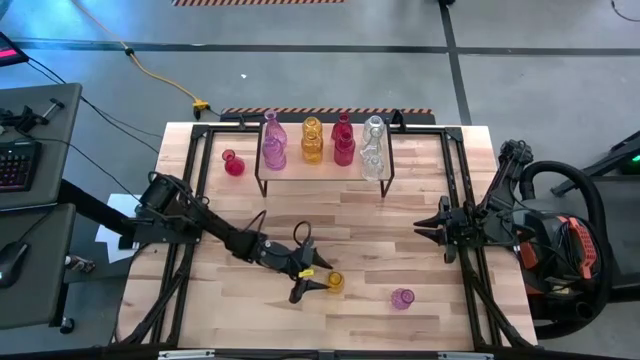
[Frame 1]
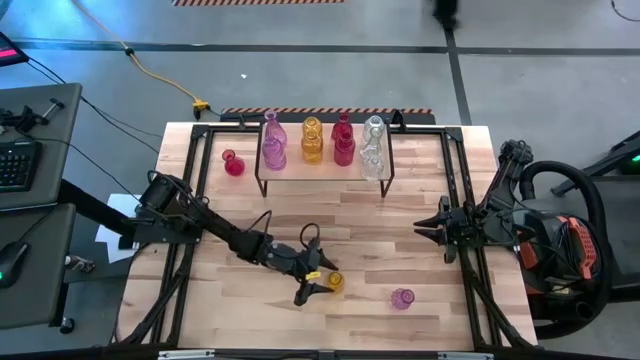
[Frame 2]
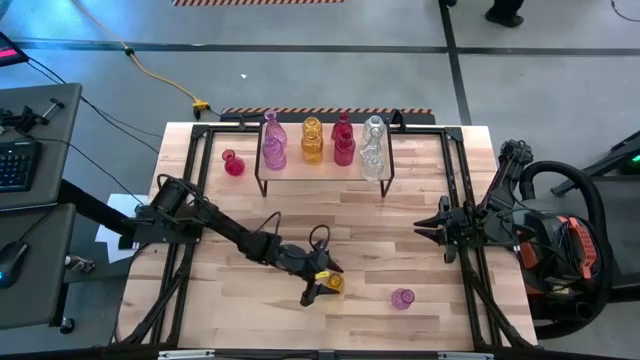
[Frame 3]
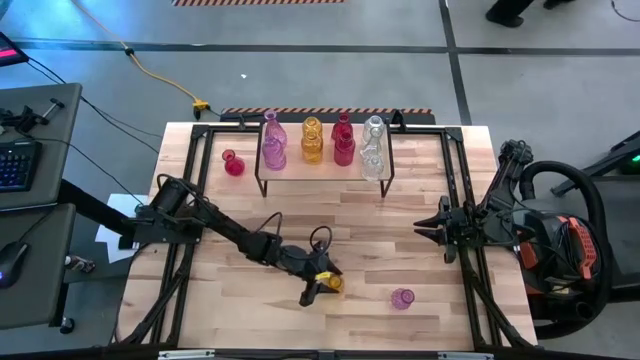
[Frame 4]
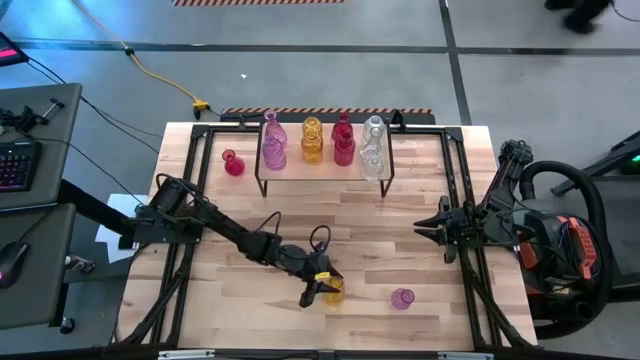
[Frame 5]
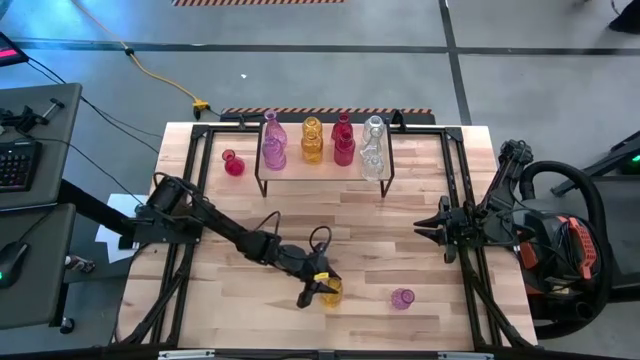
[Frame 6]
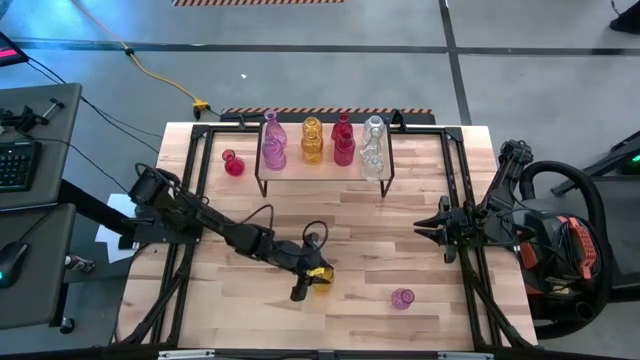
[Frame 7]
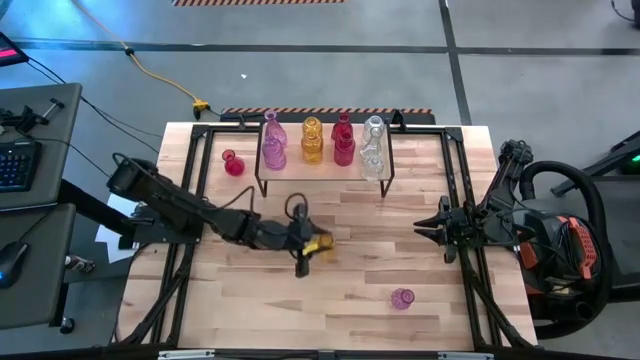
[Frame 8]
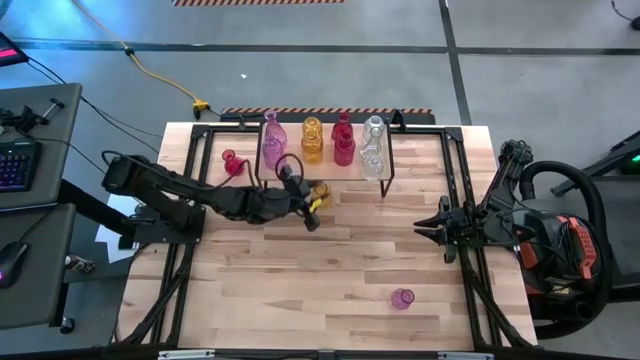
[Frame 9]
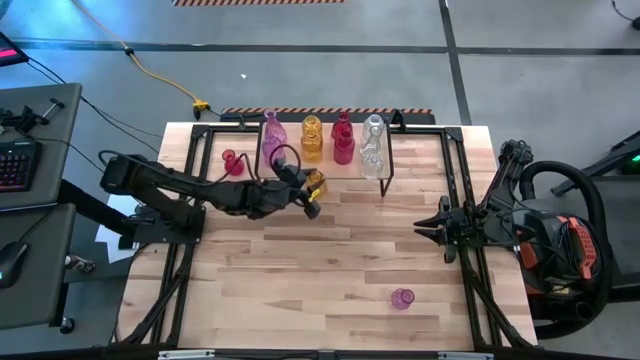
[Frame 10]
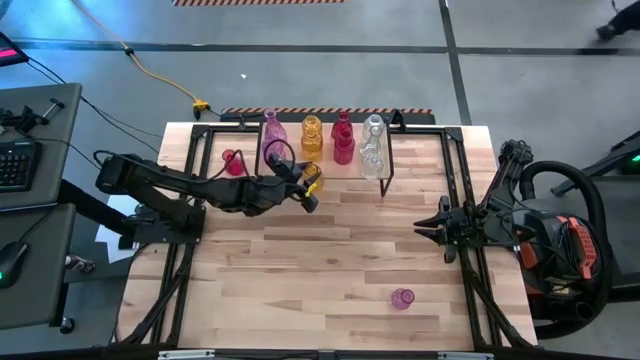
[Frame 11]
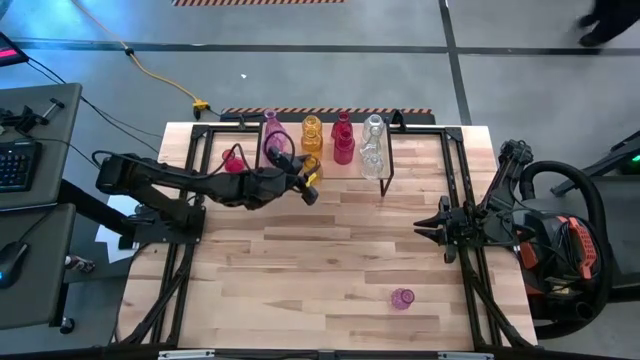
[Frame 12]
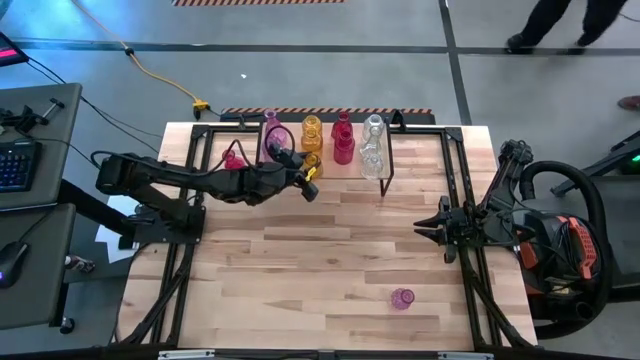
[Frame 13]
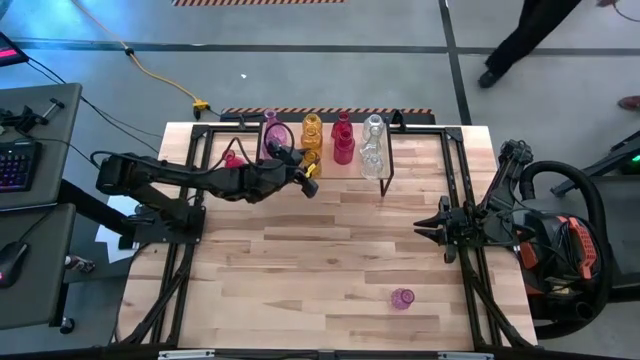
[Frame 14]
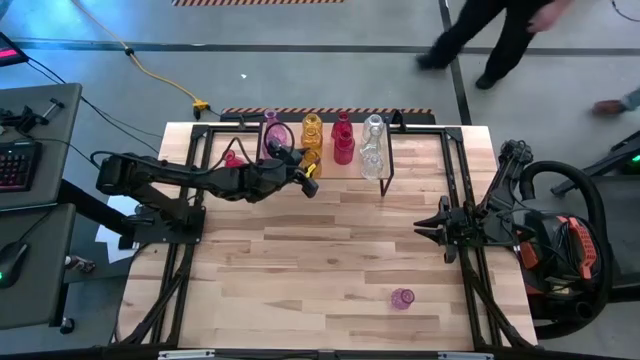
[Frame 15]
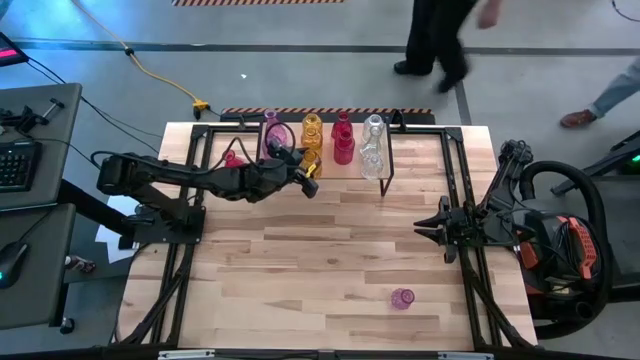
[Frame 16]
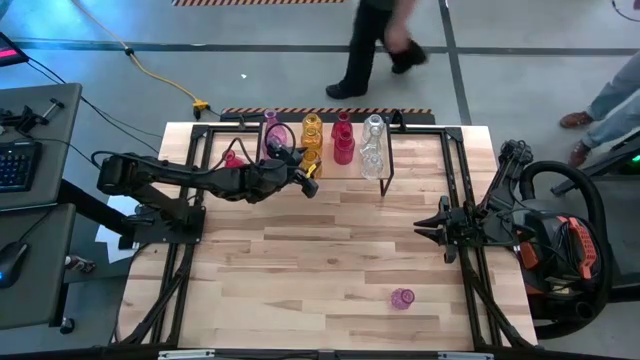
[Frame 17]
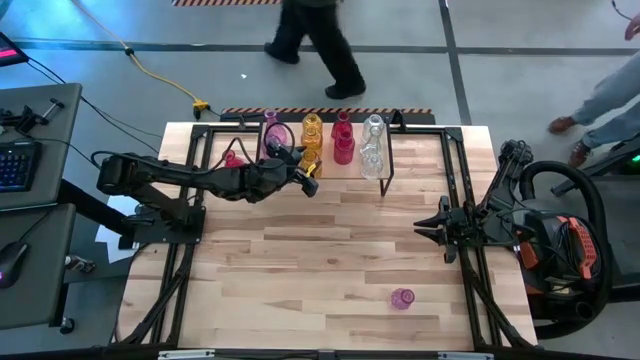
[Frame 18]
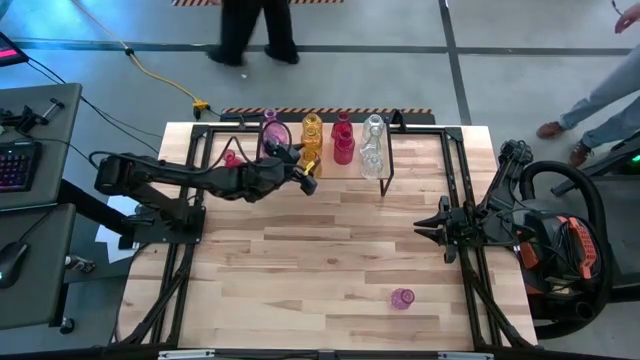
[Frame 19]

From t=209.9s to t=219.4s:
Task: sort vases onto shelf
Put the yellow vase on the shelf aligned with the other yellow vases

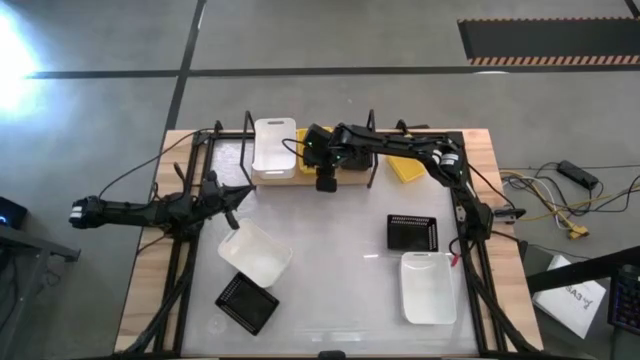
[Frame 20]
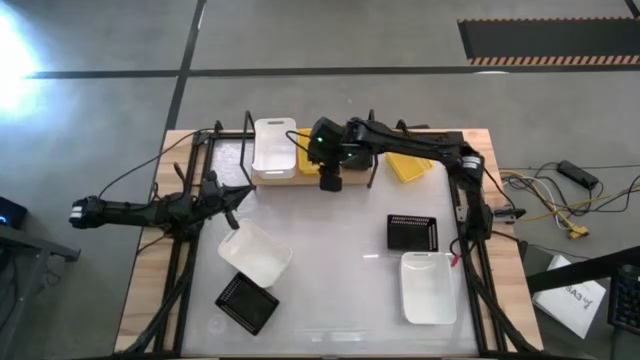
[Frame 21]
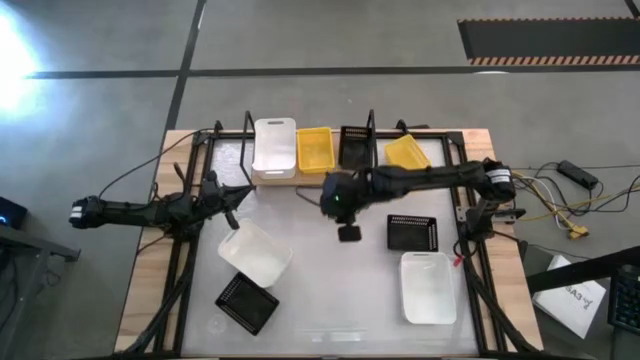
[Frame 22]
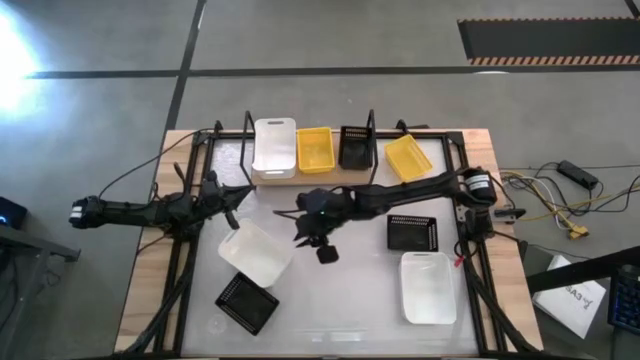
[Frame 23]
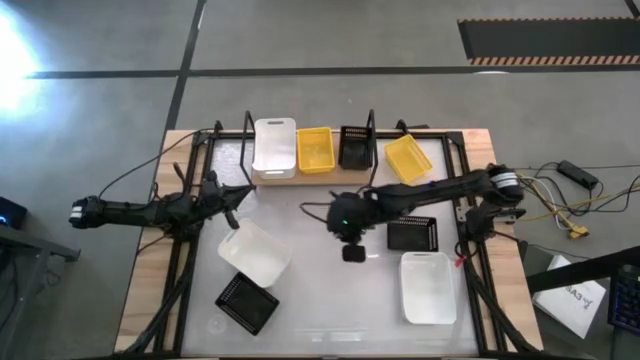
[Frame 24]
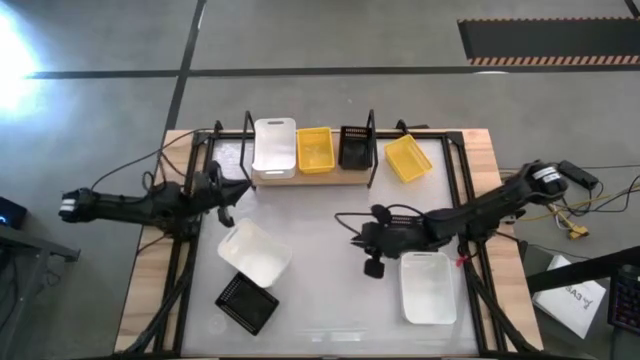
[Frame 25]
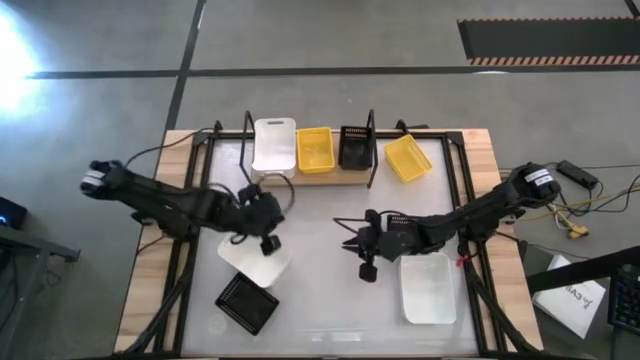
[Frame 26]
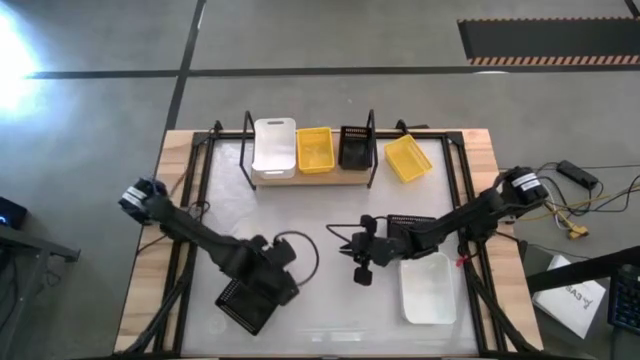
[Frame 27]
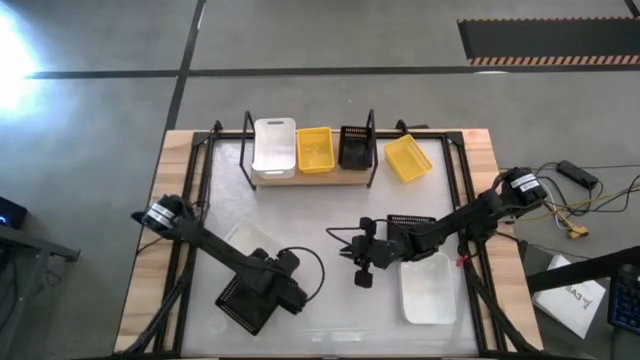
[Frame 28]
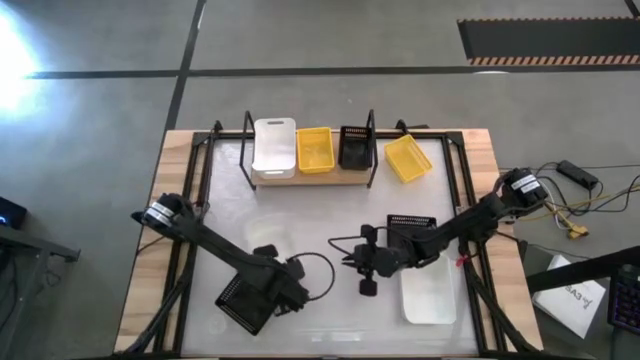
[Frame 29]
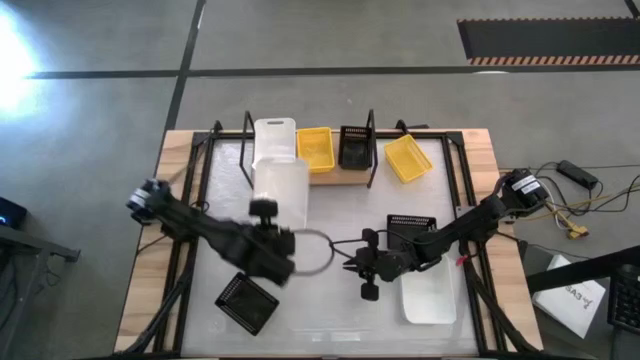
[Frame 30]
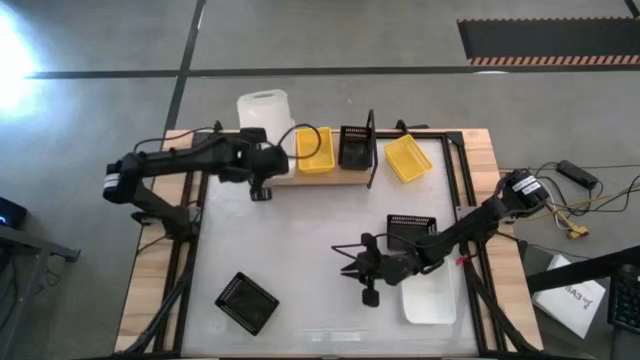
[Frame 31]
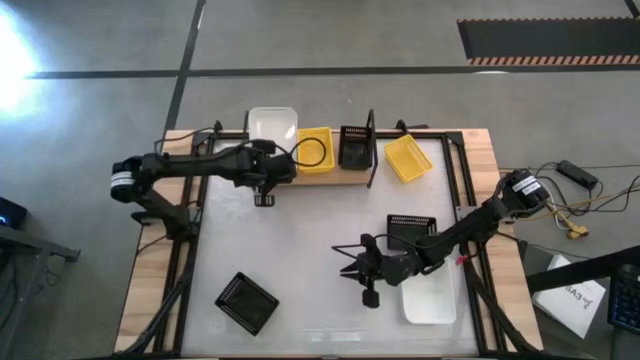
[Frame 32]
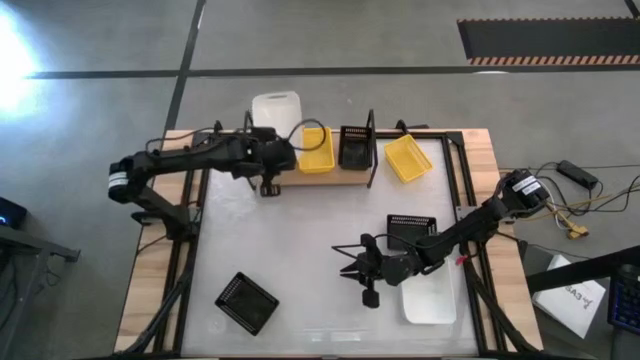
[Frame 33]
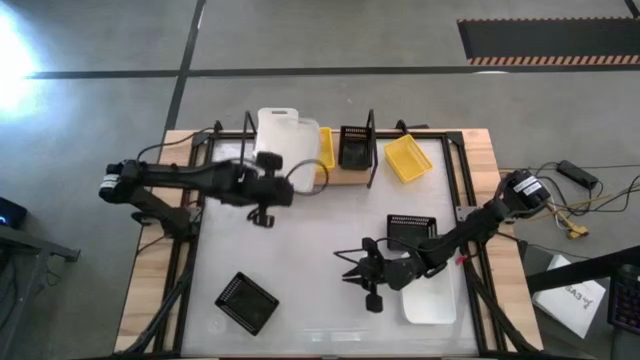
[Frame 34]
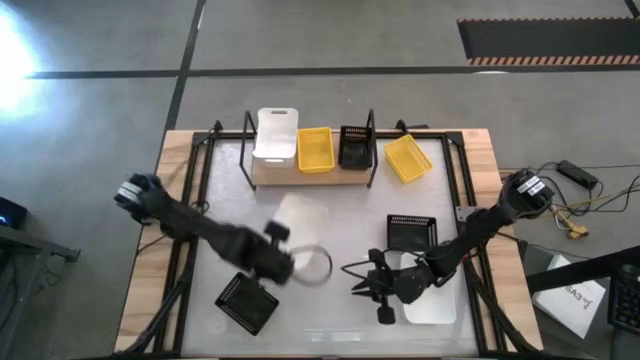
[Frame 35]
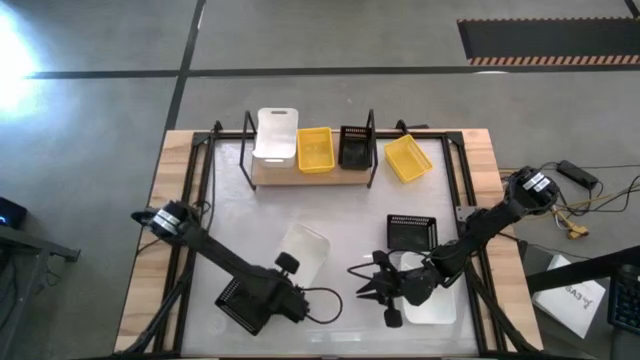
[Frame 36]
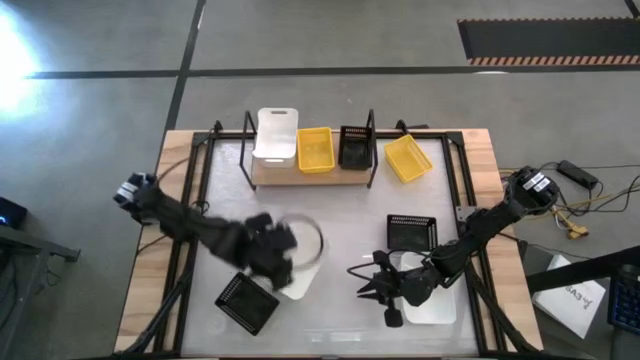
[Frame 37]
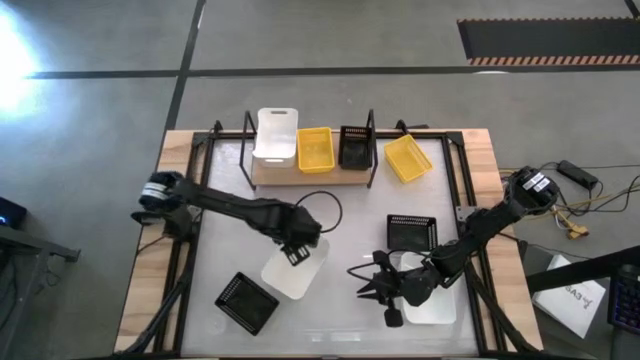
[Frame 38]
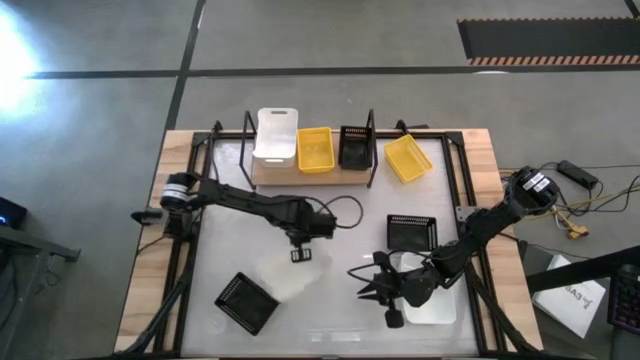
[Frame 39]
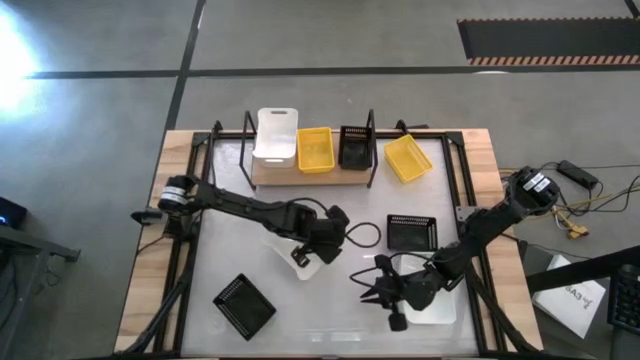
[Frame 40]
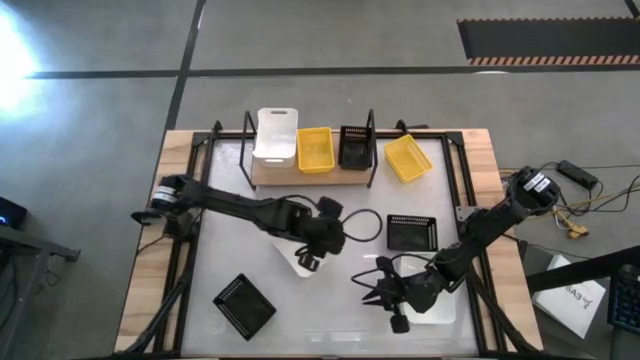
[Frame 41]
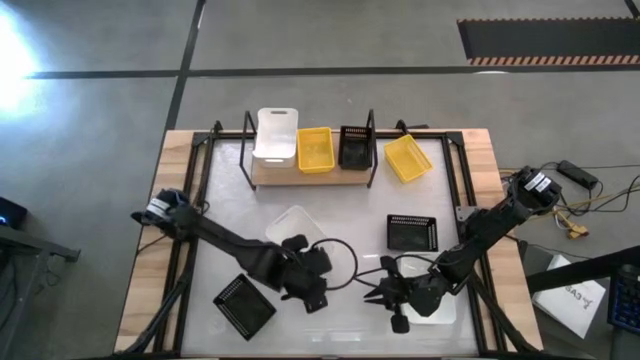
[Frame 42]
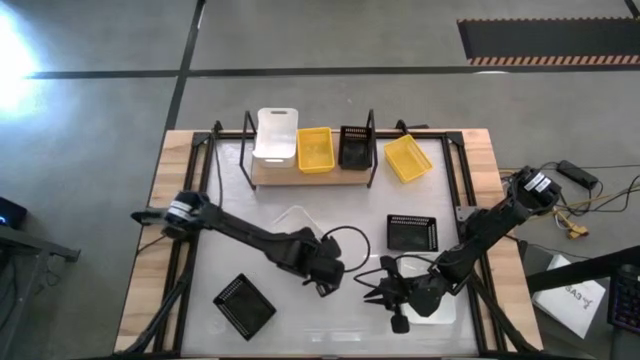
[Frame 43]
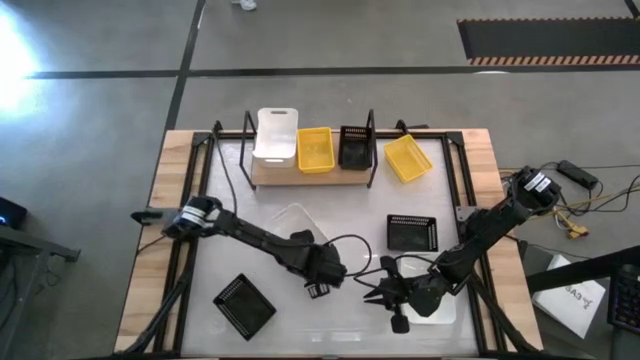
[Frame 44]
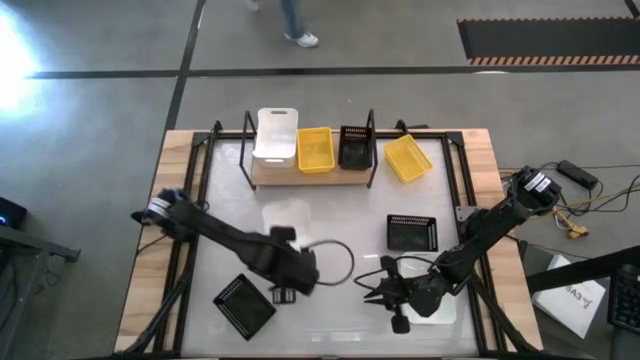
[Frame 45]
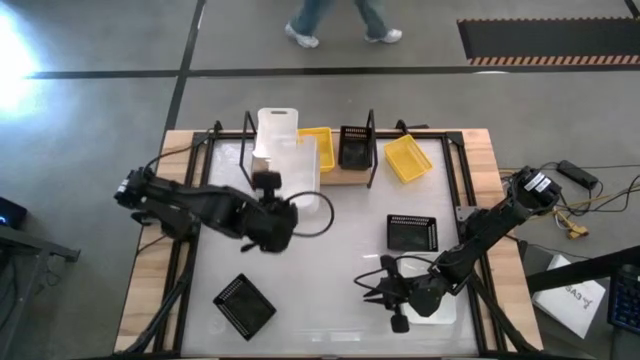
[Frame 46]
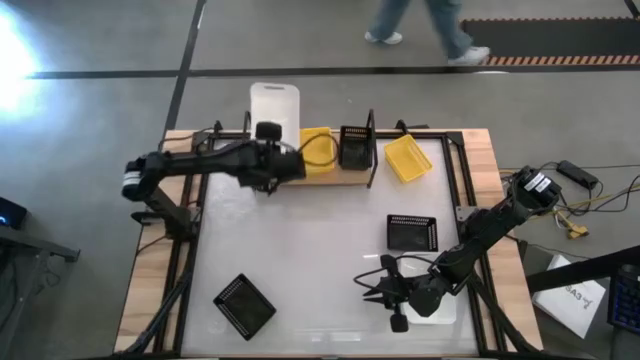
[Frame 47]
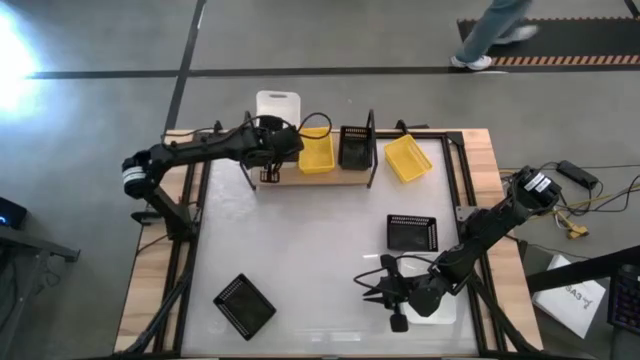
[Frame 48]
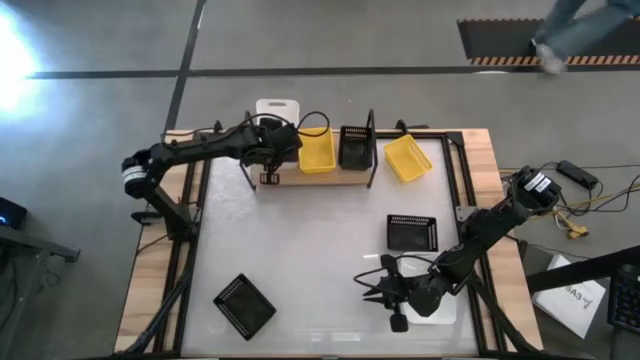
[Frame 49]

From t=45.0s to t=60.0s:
Task: Stack baskets on shelf by color
Stack the left white bin on top of the white bin on the shelf
